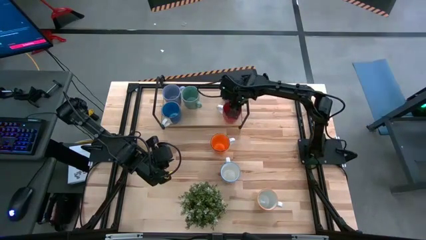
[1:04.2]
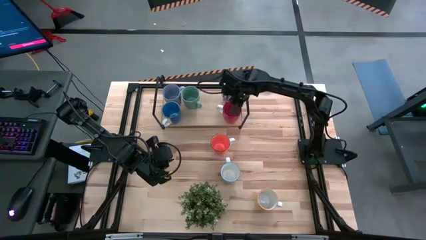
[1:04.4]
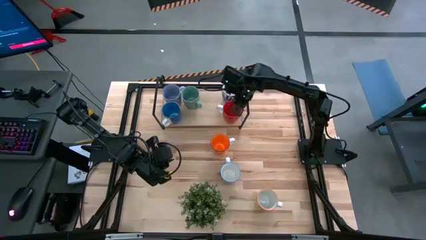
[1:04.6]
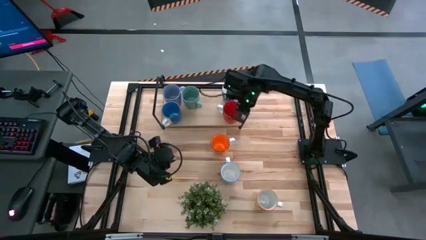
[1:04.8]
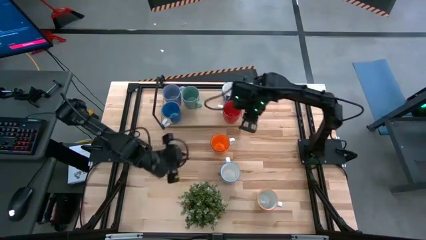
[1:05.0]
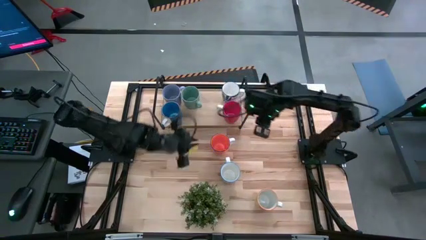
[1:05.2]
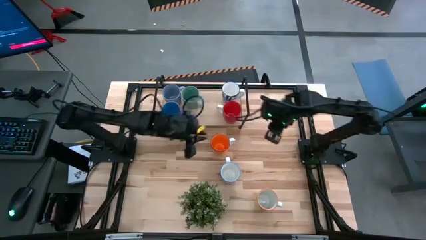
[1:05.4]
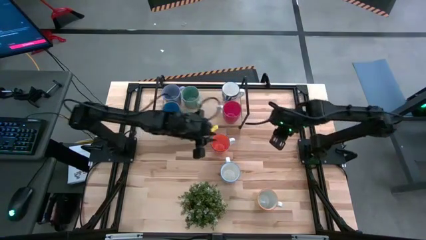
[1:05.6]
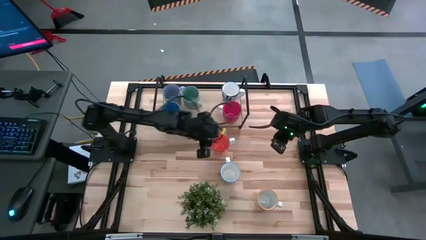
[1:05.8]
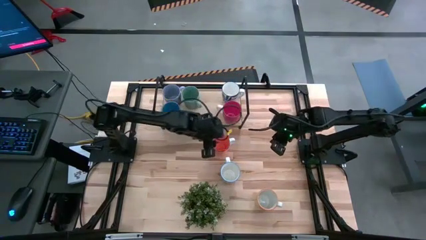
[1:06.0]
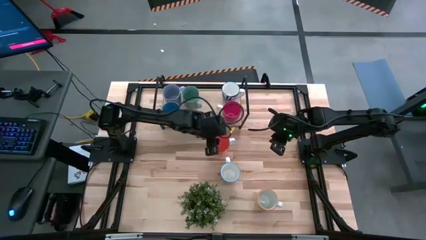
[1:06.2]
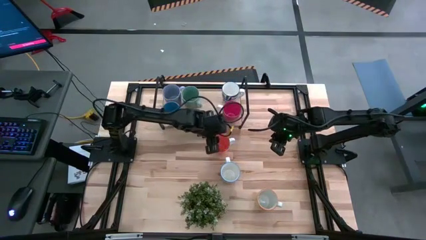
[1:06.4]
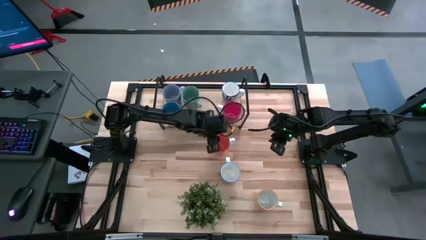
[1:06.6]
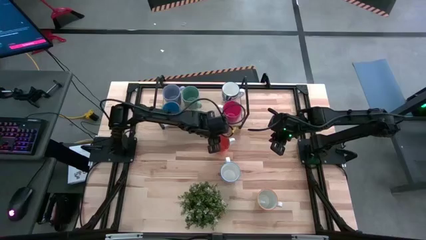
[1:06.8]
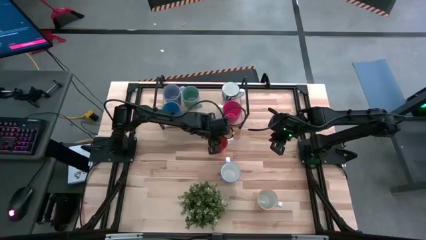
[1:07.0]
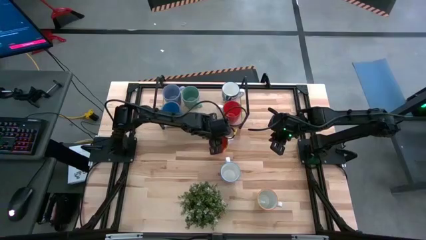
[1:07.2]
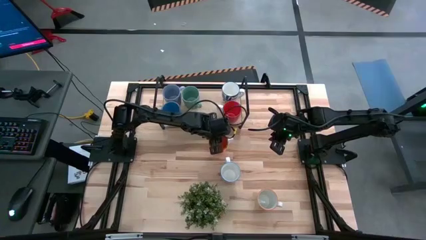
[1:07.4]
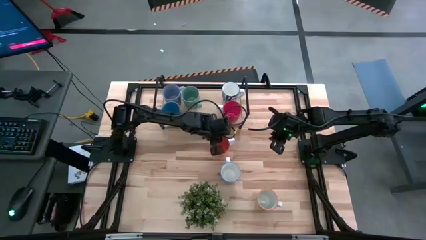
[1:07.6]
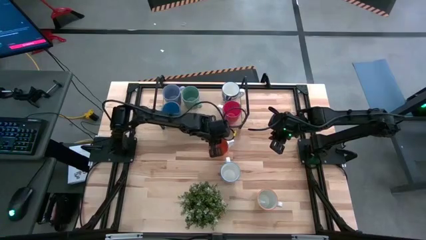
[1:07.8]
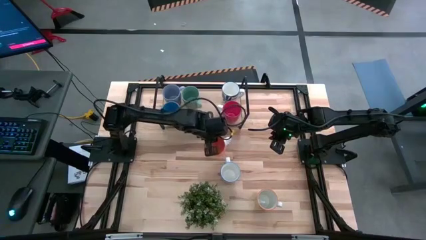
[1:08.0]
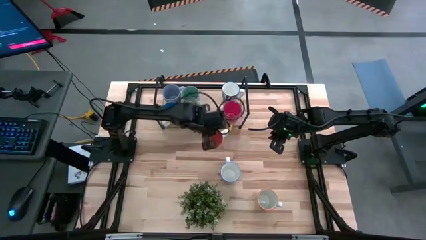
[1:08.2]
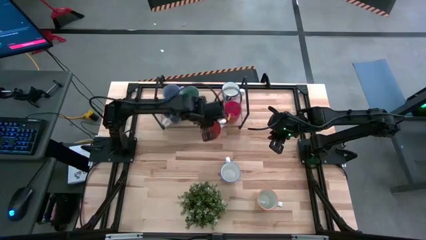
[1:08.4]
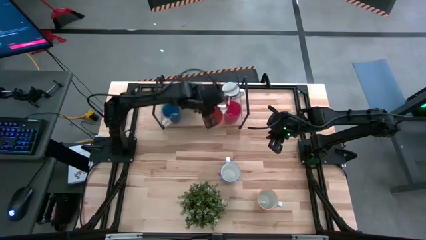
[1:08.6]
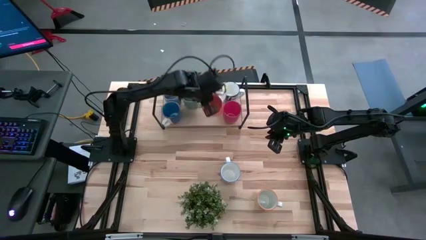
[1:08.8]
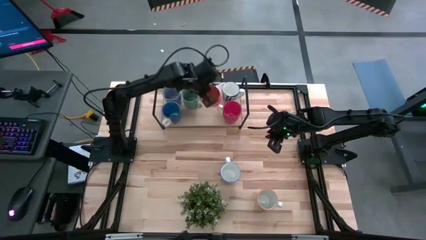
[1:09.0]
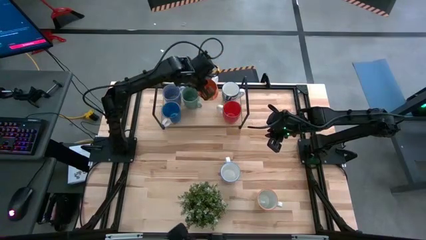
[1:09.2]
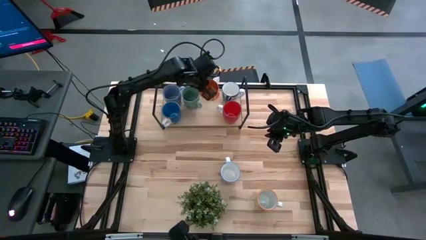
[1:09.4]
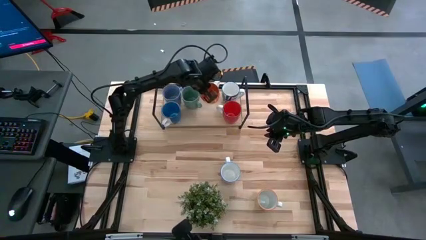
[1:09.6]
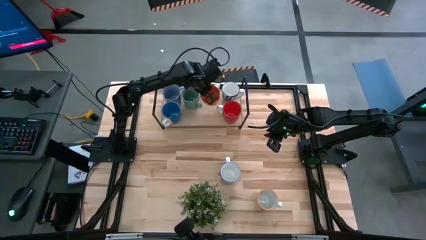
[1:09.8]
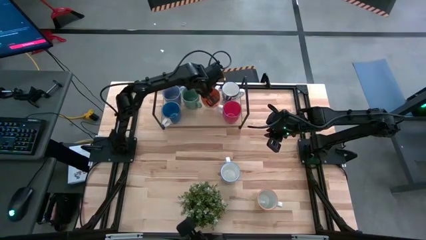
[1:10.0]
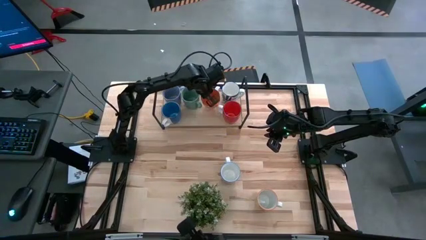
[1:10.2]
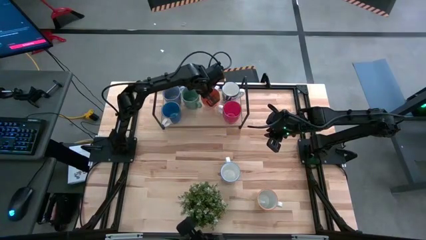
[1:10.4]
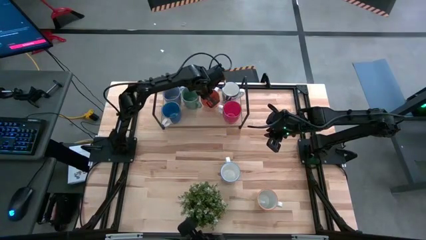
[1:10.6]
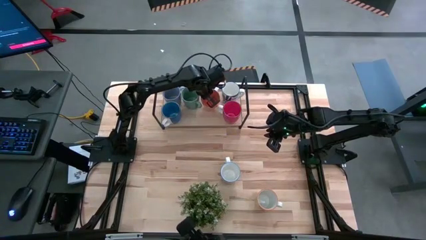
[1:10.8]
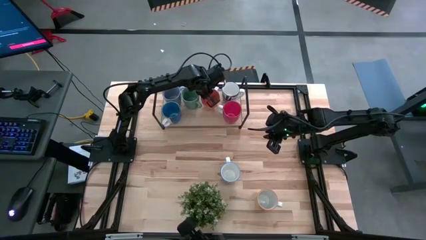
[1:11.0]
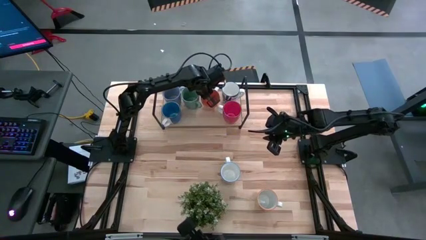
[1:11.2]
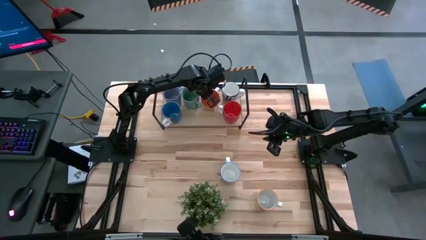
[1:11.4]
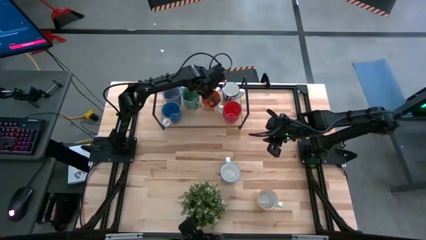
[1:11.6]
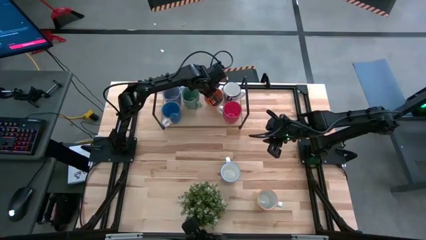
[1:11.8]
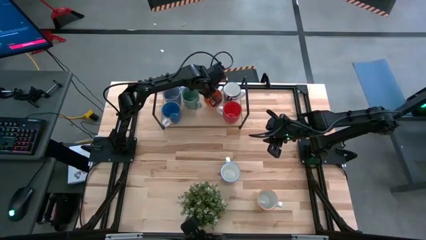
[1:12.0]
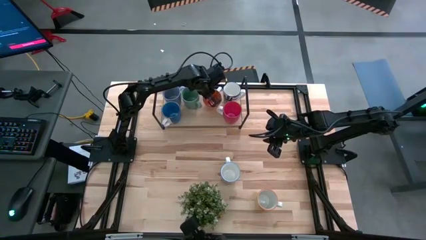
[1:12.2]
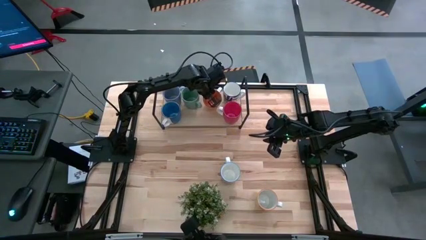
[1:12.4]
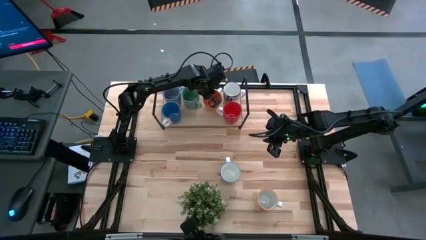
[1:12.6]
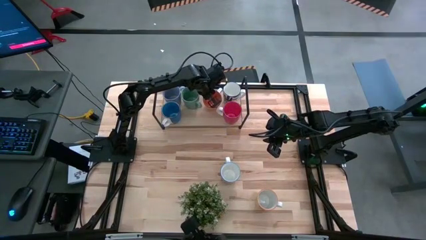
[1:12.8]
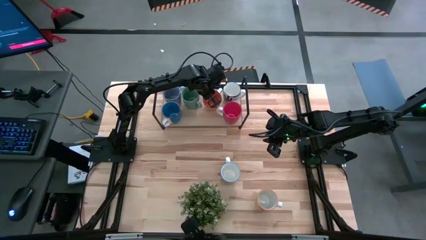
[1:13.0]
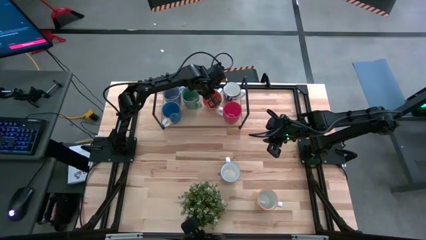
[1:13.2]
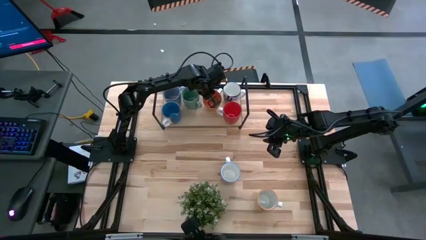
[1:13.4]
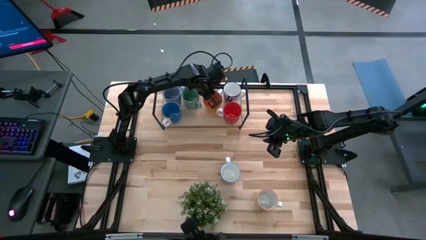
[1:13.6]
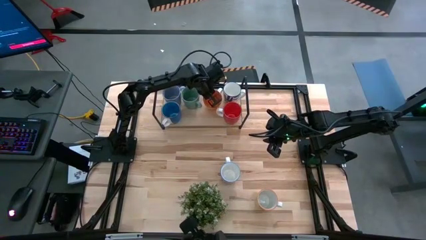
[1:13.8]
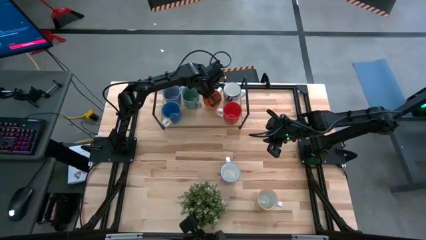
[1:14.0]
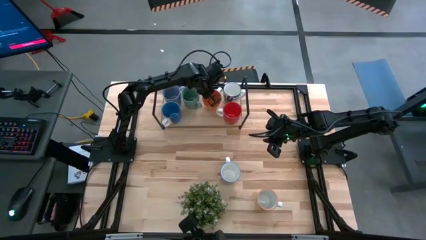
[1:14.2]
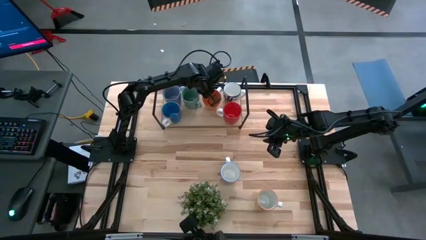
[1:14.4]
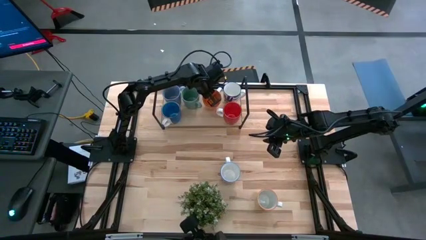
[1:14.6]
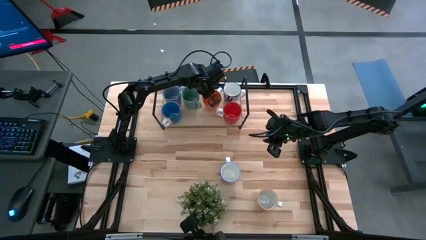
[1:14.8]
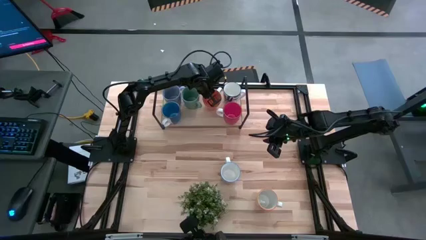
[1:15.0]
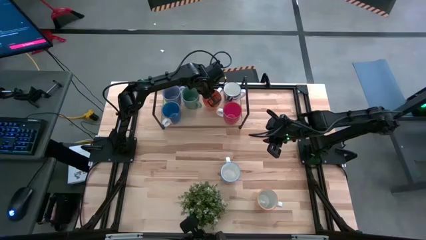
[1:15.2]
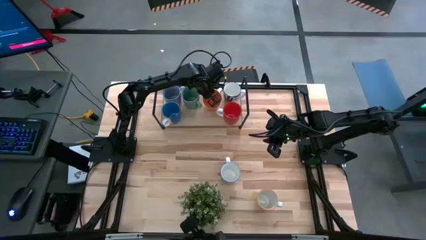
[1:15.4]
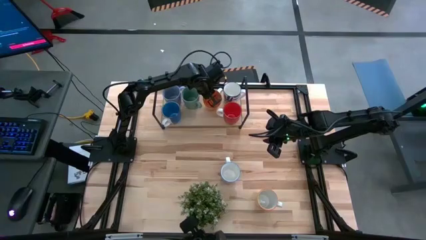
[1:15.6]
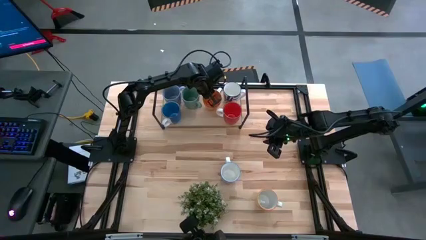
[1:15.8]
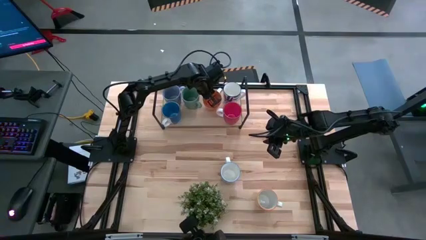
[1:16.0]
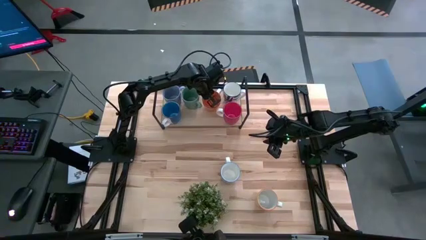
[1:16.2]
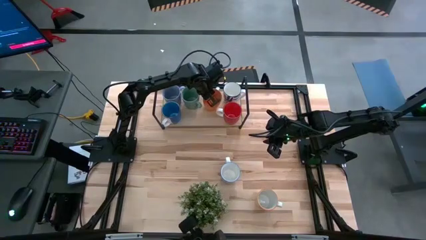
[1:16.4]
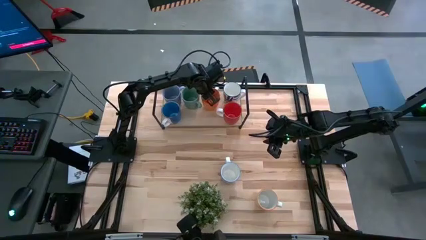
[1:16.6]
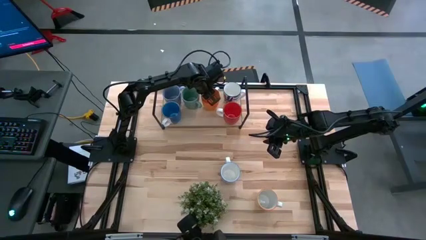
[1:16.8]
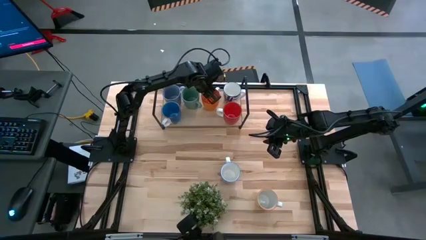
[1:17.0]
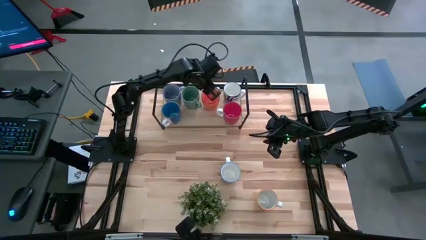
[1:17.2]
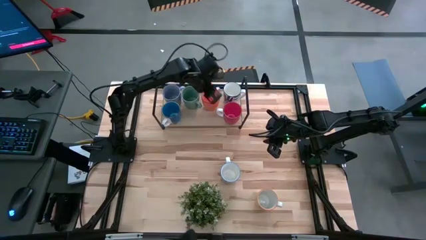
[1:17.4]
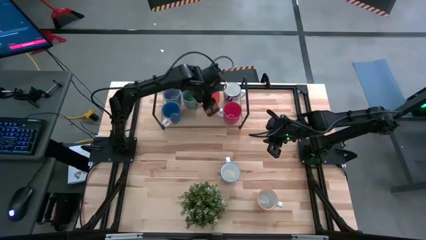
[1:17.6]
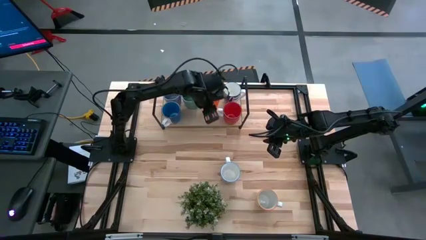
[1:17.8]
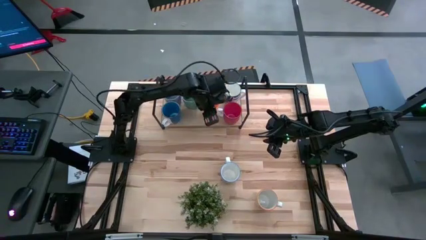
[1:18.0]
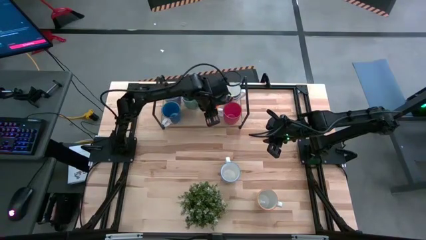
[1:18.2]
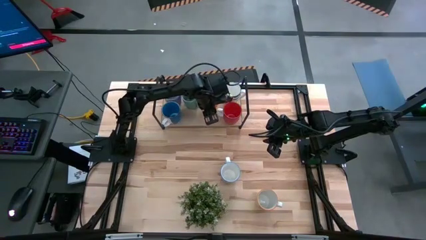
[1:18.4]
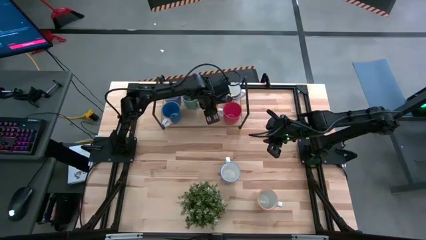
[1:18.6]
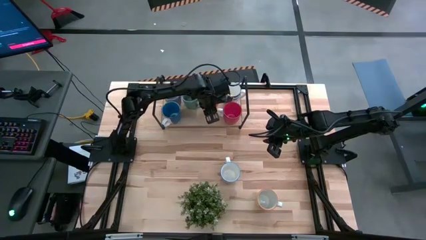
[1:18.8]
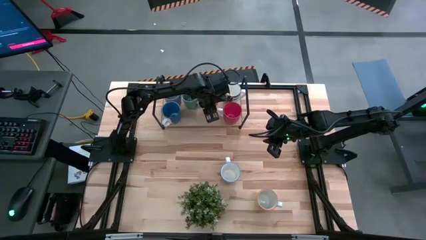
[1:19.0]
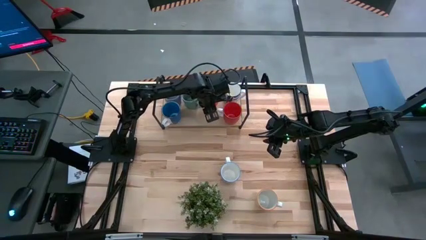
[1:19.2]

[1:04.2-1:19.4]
Task: Place coffee mugs
Put the orange mug on the shelf

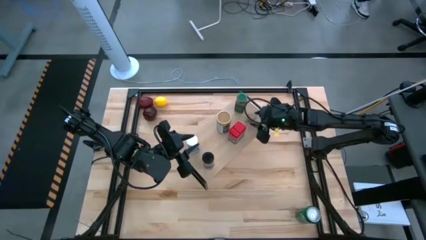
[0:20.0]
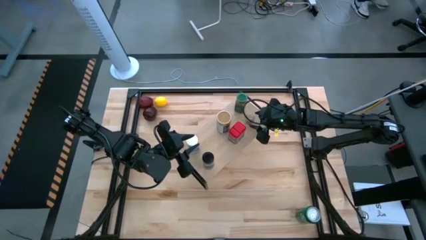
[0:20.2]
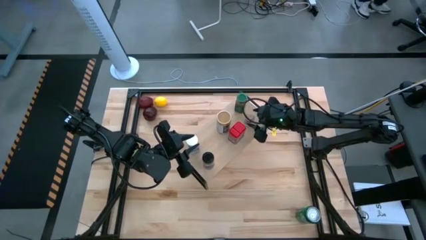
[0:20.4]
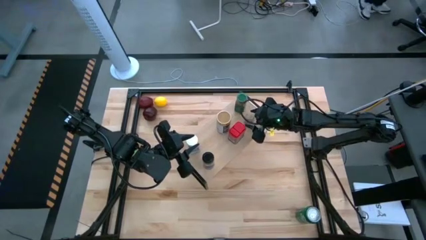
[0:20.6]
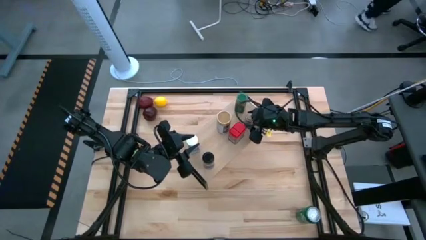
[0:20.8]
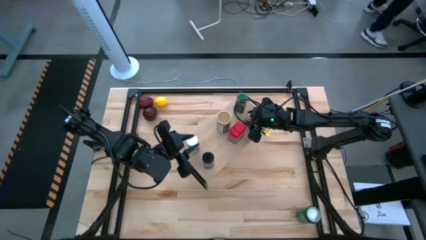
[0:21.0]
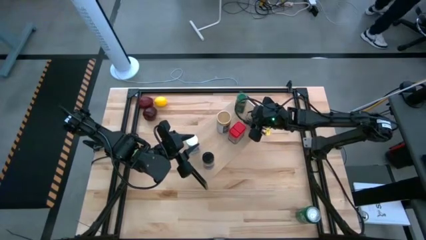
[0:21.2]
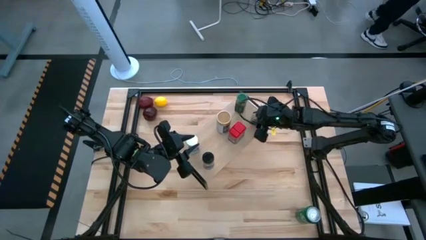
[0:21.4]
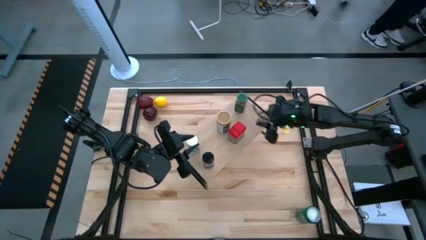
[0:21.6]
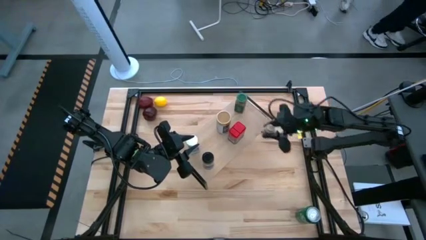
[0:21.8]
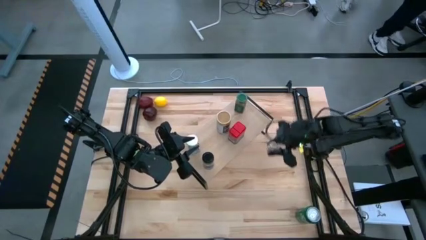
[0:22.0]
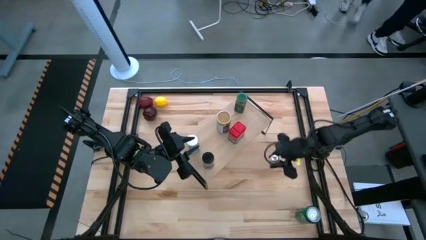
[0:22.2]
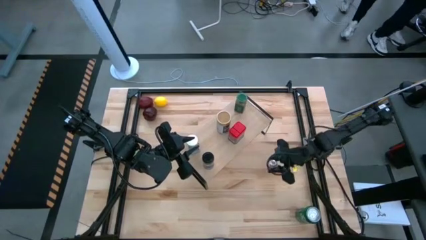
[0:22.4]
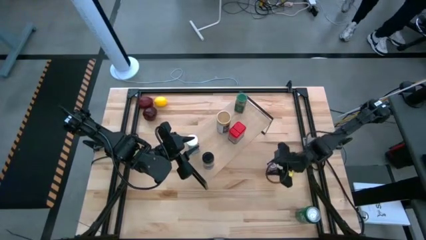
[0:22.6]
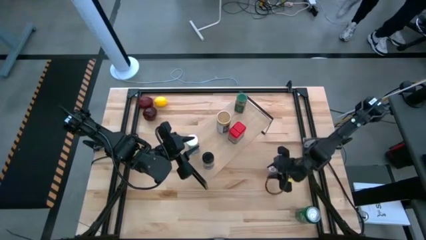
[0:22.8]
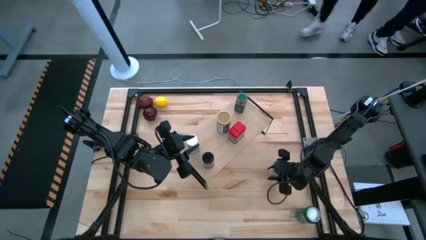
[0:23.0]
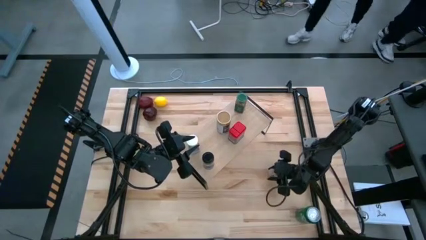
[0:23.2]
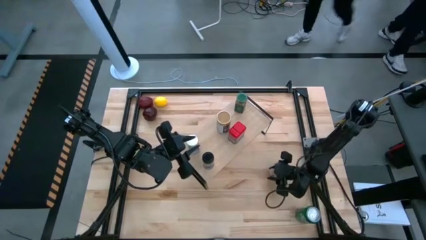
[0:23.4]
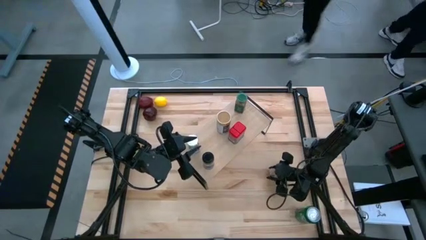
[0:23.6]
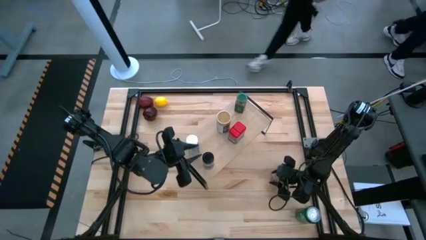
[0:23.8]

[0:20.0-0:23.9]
Task: Shelf spices
Remove the brown seasoning bottle from the shelf
